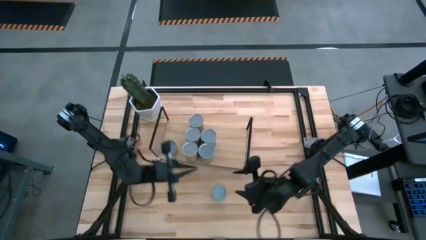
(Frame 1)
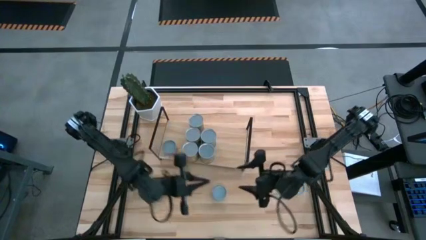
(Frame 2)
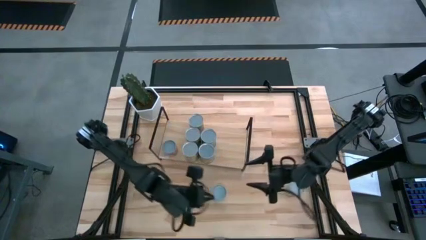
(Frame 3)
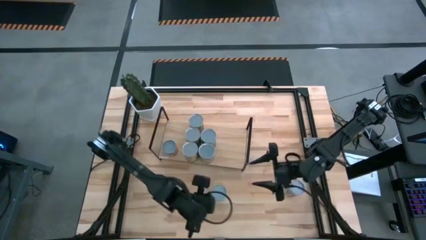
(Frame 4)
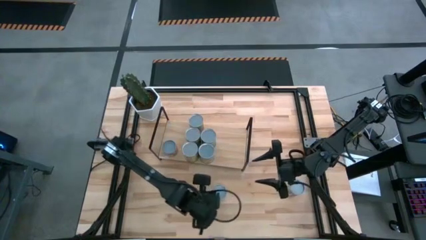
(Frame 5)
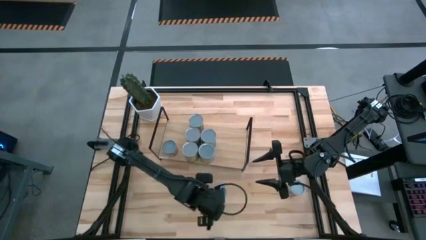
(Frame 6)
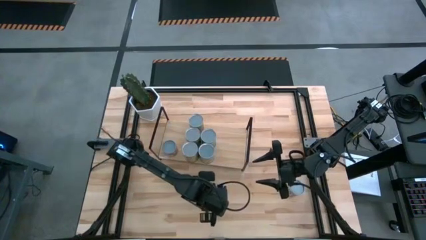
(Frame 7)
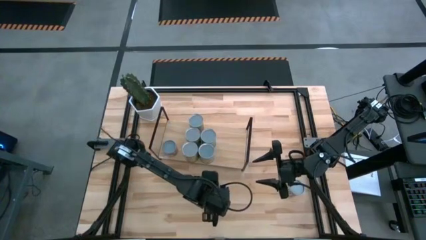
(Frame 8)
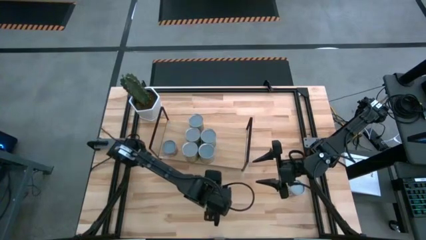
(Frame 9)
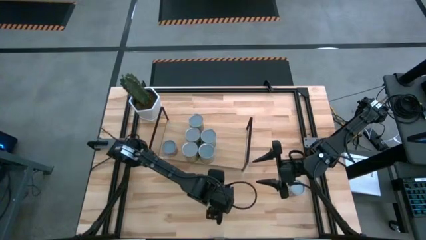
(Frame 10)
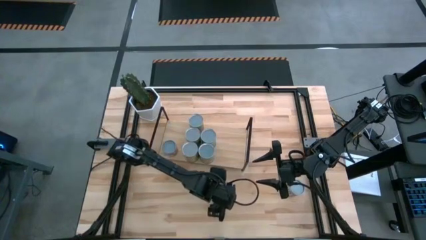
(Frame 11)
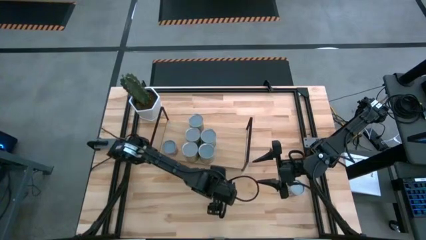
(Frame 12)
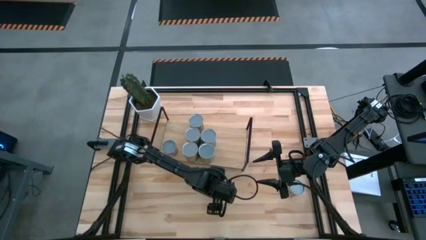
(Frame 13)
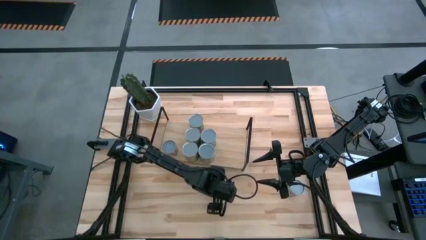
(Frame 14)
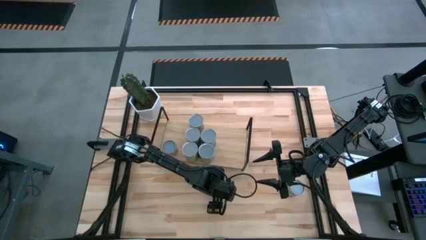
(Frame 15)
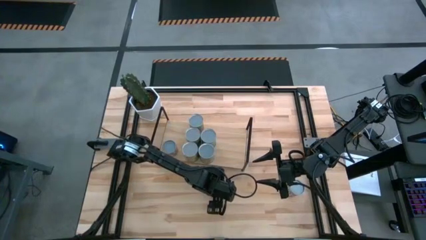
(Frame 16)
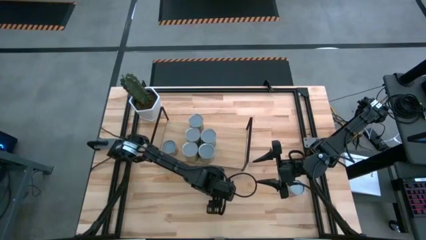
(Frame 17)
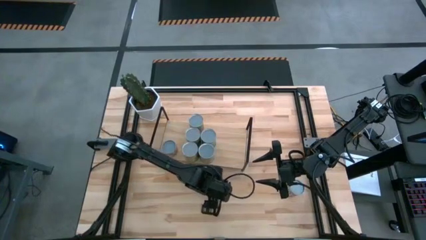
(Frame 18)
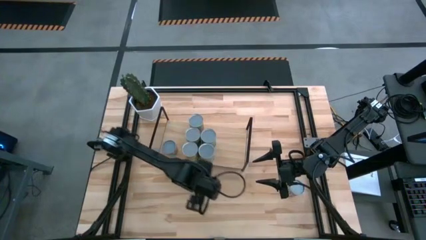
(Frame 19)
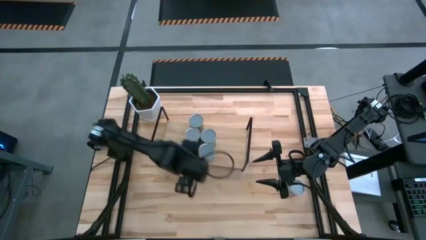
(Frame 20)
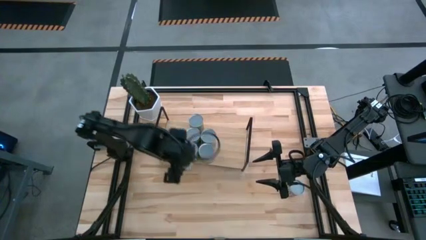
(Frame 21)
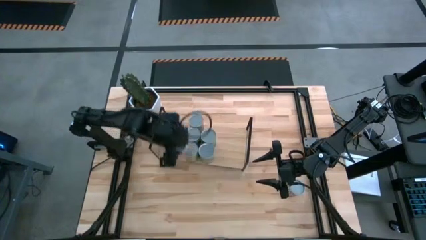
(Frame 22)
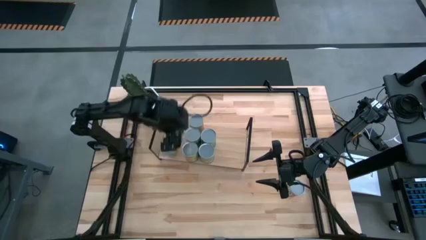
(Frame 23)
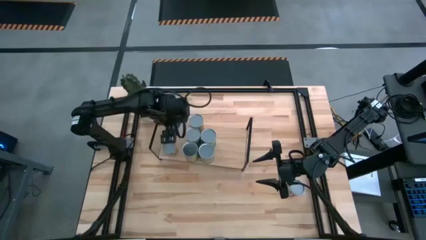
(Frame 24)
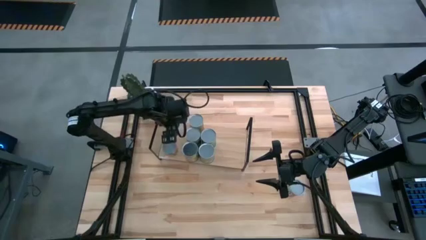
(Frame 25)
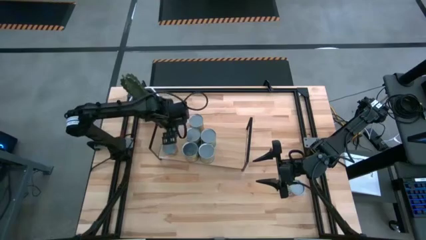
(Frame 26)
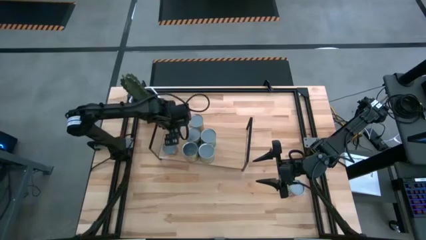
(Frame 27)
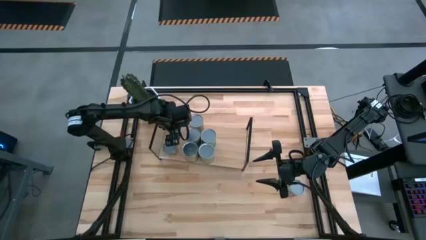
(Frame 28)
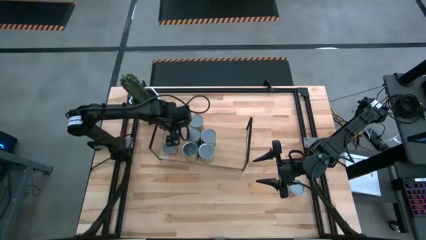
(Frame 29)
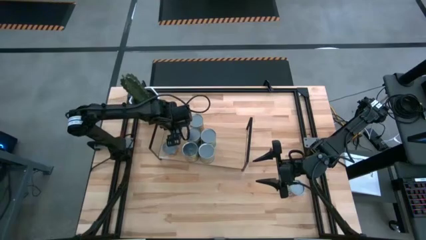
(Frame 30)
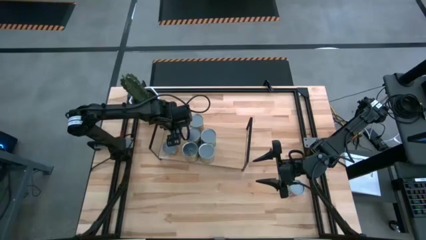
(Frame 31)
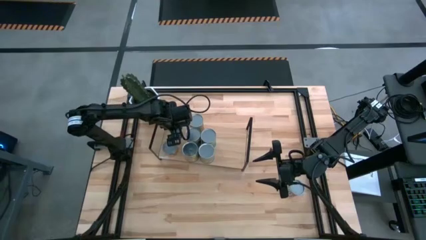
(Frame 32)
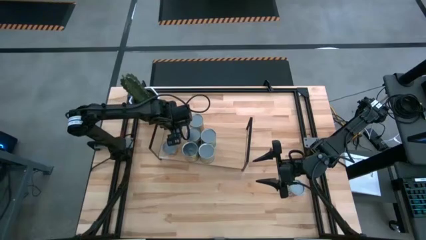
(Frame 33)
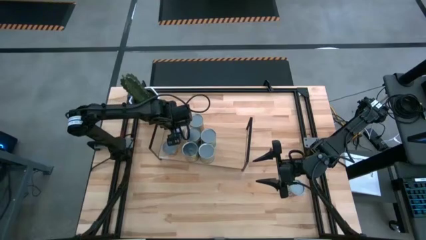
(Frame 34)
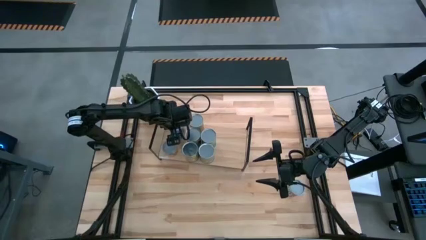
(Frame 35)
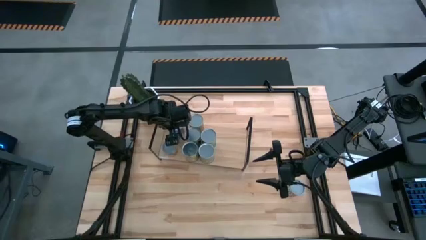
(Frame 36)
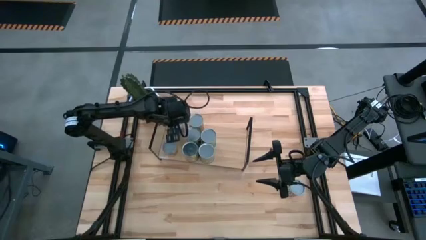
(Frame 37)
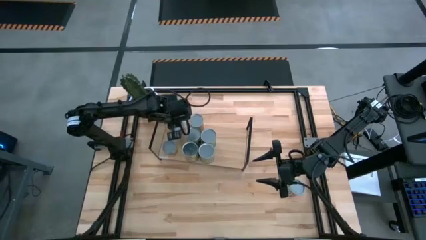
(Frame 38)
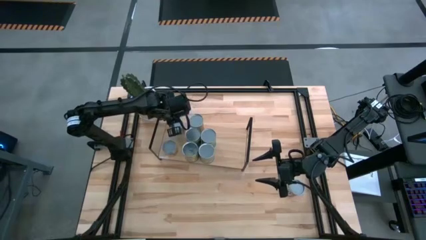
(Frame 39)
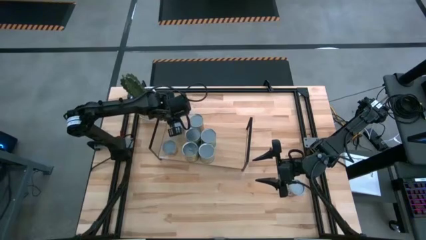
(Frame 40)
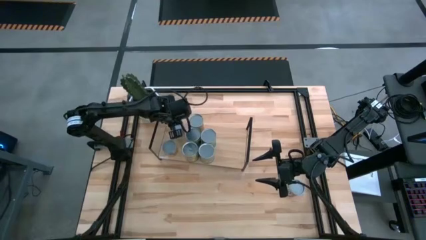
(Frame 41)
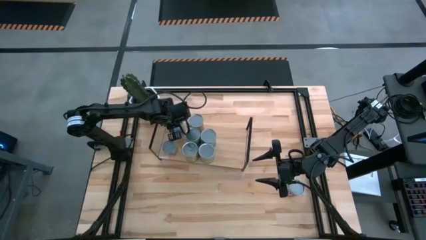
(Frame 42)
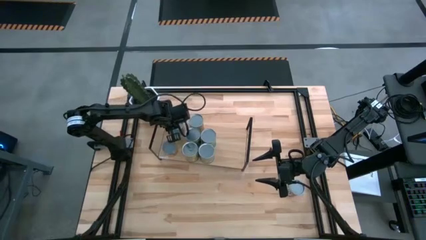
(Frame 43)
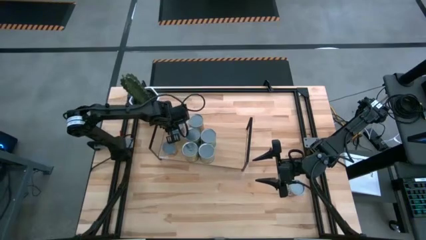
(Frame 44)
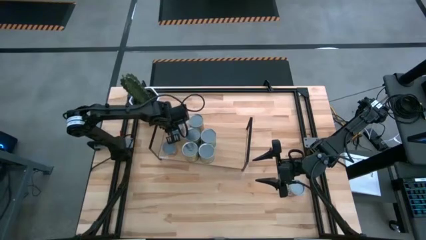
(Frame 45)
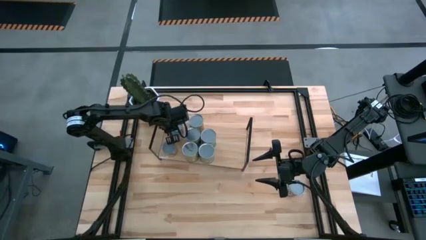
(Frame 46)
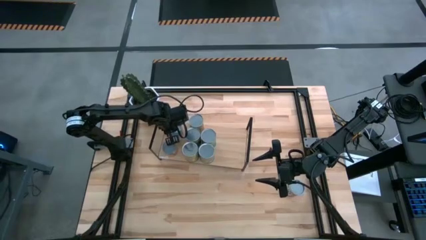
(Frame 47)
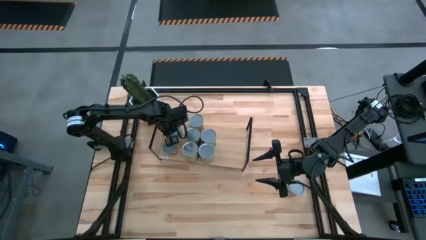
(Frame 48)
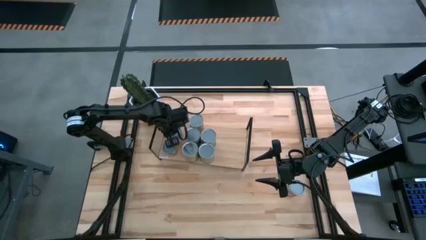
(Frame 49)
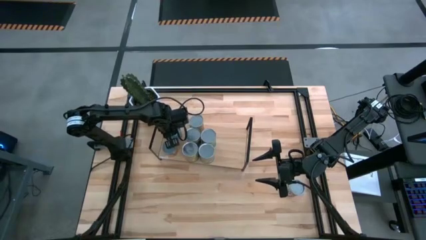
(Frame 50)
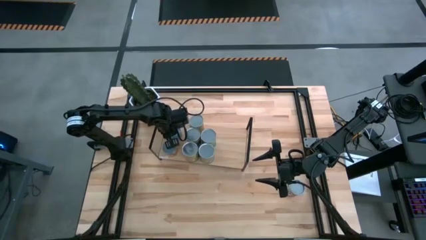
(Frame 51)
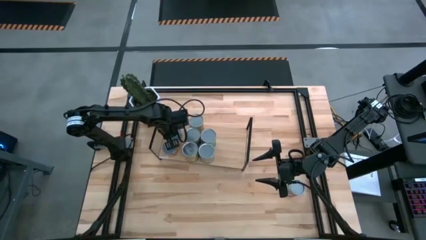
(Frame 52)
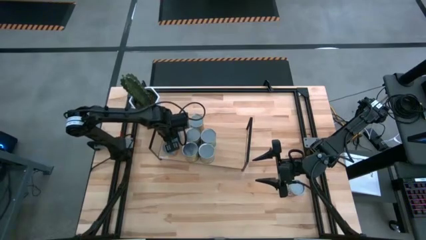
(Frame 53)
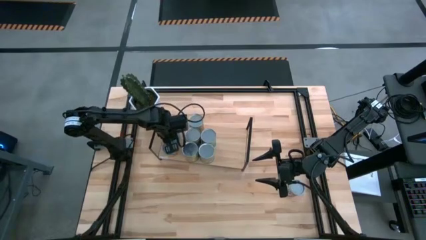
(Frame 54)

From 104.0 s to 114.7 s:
Task: Pick and place cans onto a shelf
Put the canned carrots on the shelf

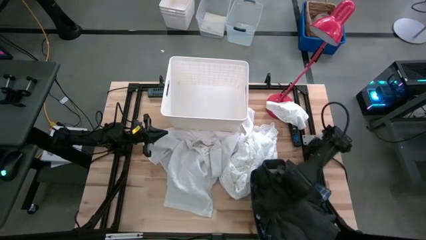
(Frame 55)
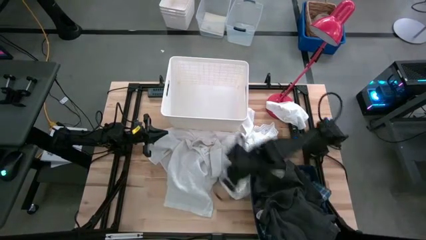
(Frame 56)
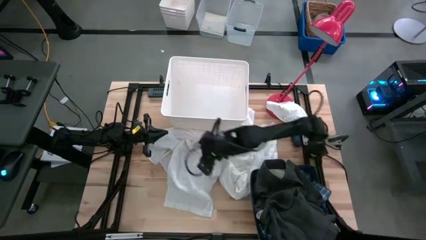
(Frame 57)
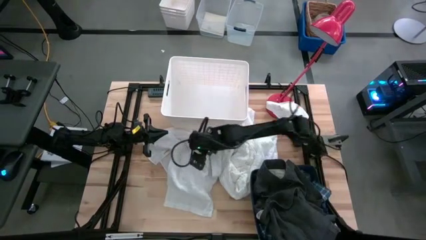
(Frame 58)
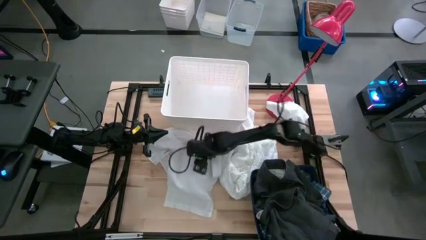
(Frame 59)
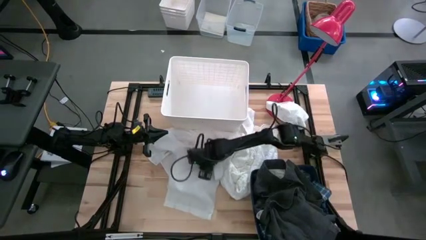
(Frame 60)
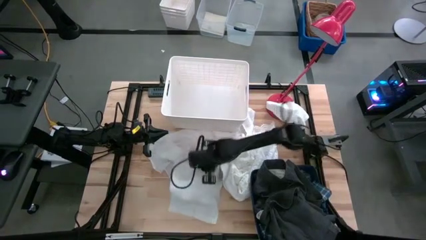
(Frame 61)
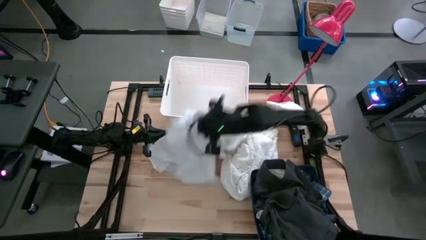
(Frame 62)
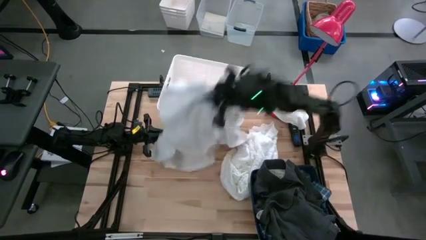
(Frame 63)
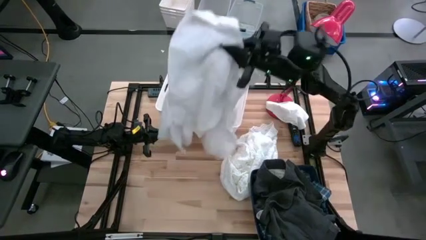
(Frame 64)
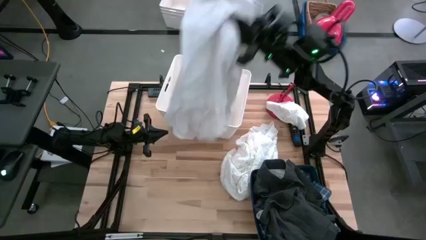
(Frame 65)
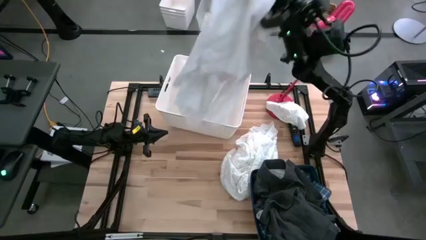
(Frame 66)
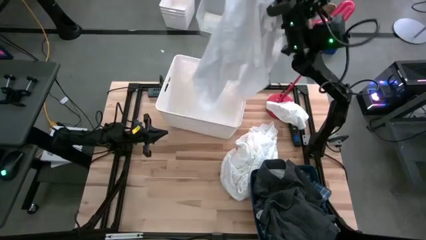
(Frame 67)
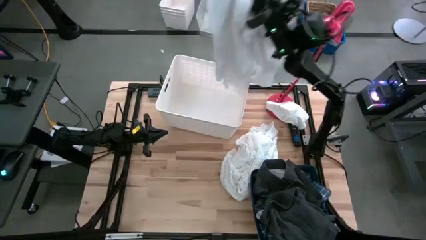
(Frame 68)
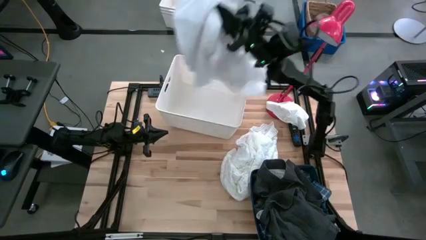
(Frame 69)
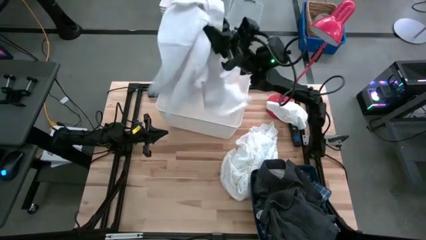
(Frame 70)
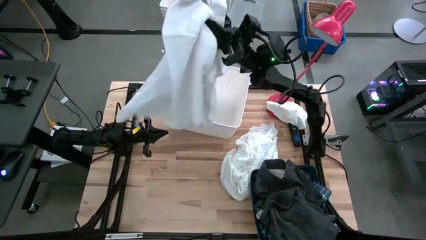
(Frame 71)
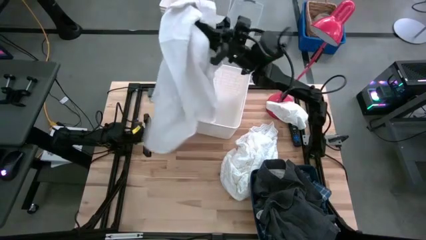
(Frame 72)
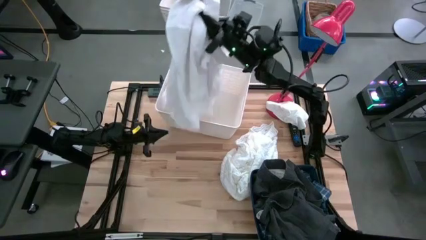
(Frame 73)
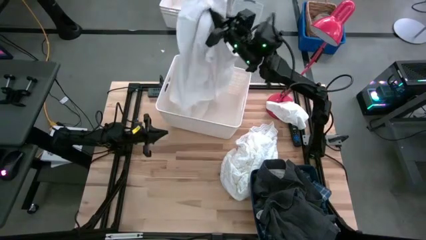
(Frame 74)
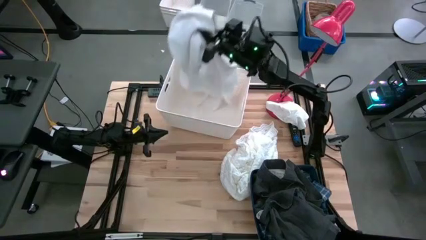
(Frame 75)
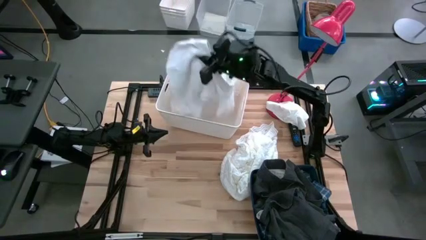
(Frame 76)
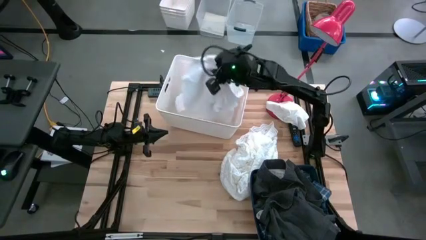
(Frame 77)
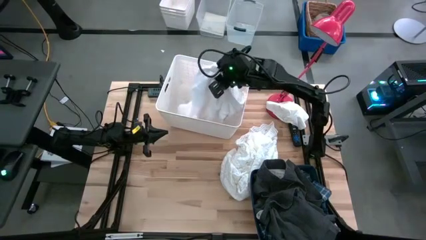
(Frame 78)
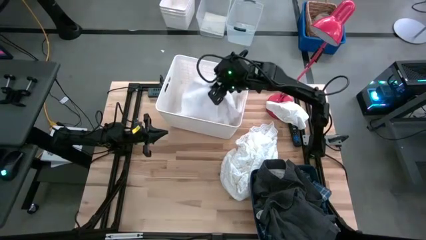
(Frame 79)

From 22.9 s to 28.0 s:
Task: Sort clothes
Put the white polo shirt into the white laundry bin
